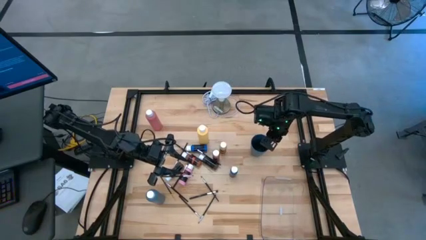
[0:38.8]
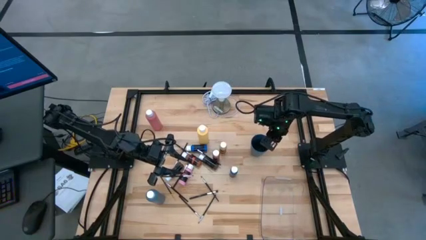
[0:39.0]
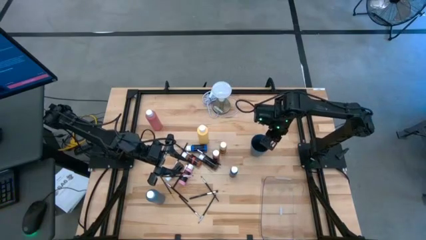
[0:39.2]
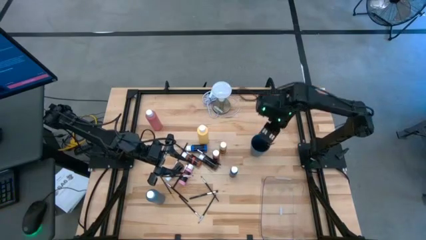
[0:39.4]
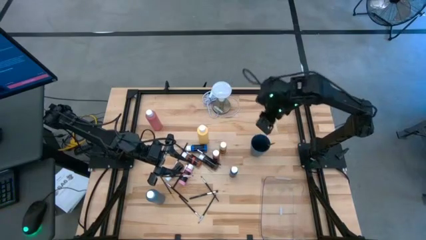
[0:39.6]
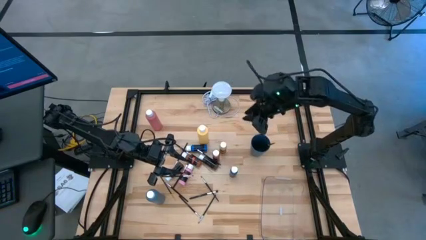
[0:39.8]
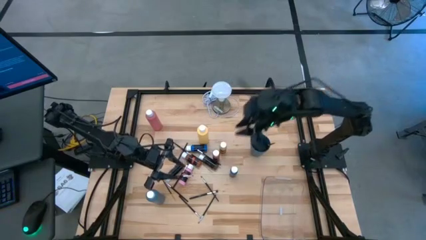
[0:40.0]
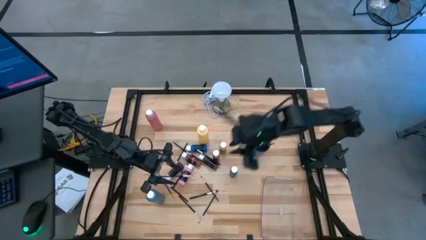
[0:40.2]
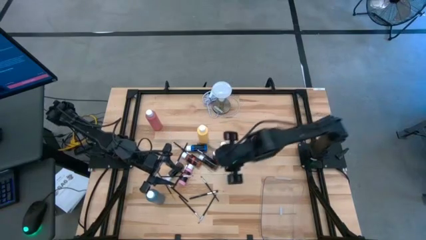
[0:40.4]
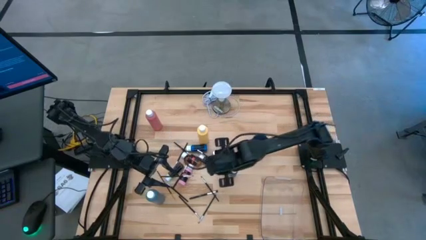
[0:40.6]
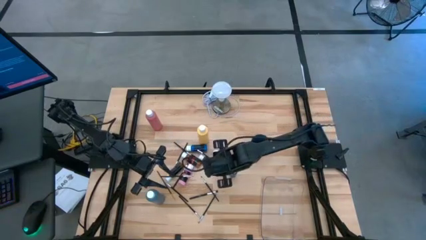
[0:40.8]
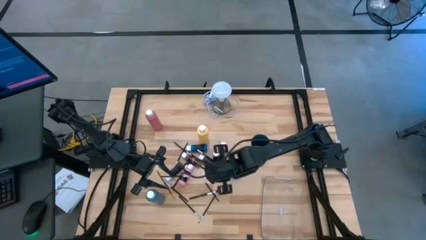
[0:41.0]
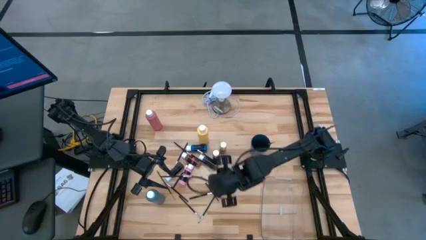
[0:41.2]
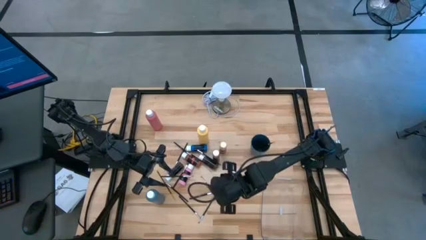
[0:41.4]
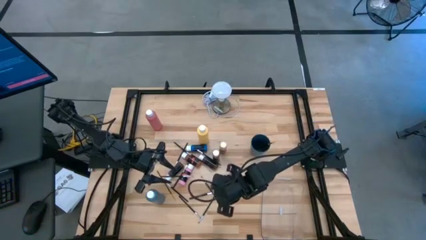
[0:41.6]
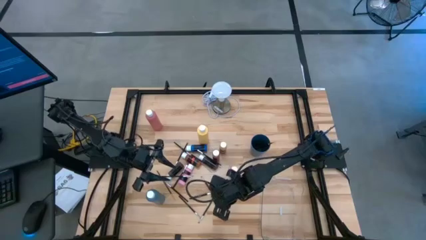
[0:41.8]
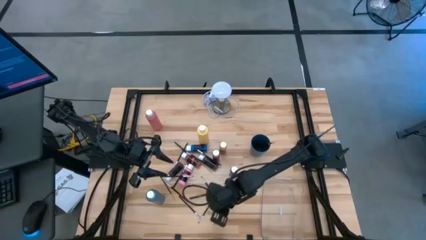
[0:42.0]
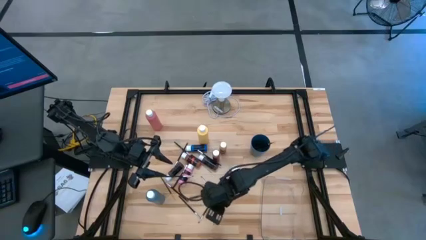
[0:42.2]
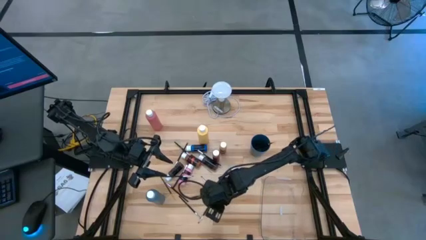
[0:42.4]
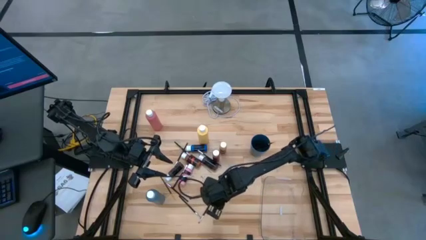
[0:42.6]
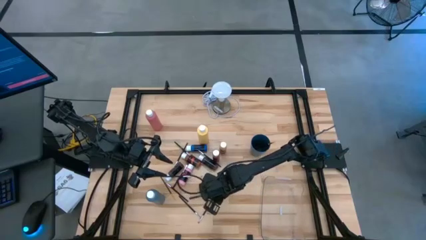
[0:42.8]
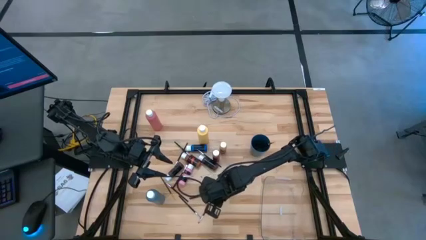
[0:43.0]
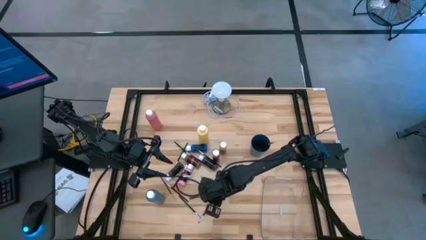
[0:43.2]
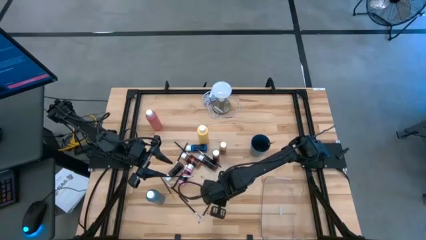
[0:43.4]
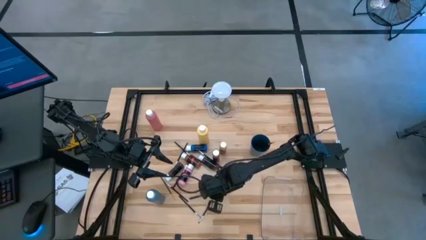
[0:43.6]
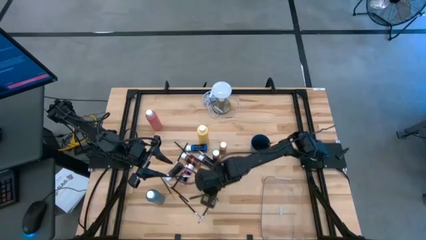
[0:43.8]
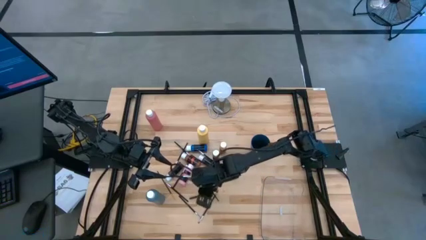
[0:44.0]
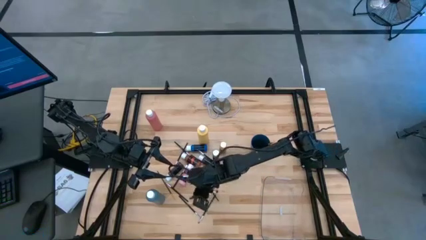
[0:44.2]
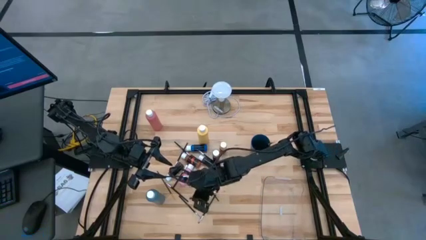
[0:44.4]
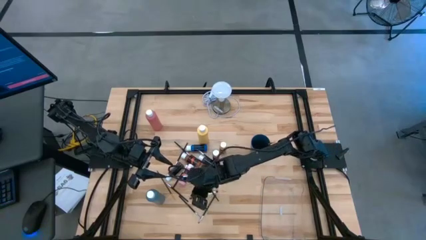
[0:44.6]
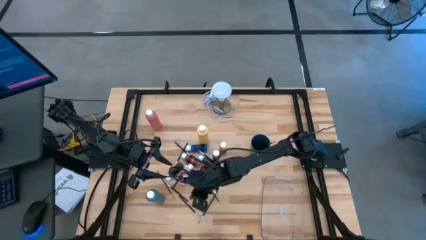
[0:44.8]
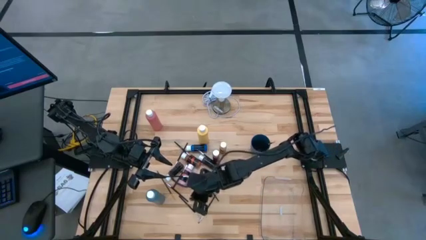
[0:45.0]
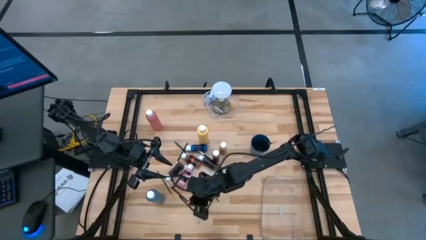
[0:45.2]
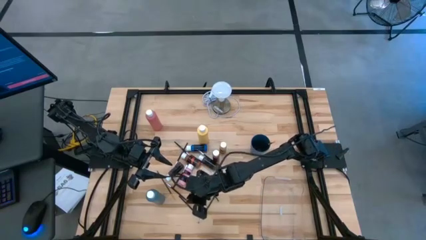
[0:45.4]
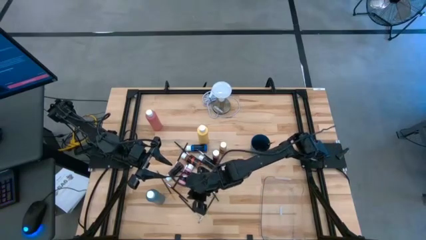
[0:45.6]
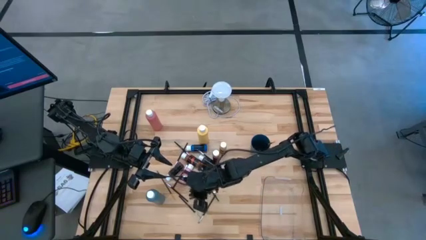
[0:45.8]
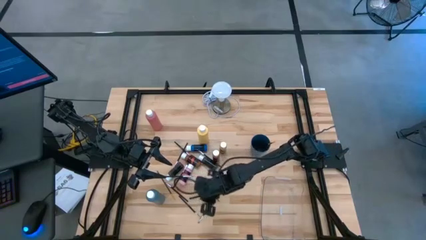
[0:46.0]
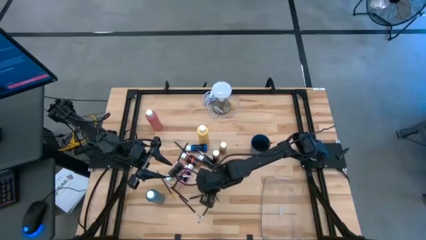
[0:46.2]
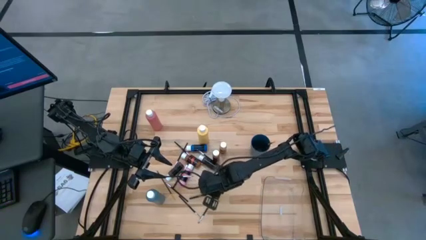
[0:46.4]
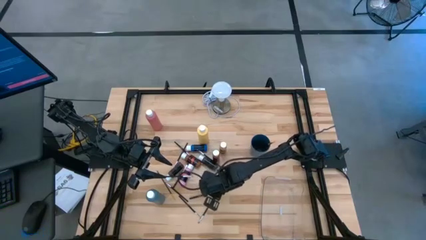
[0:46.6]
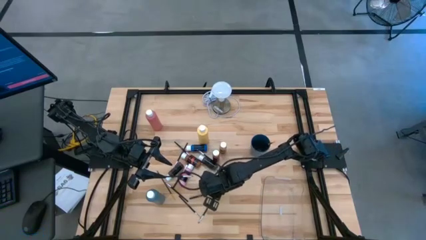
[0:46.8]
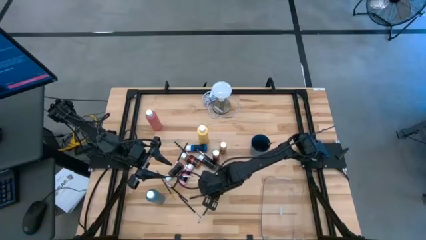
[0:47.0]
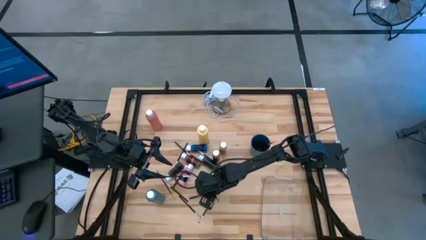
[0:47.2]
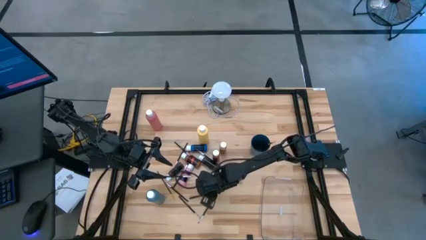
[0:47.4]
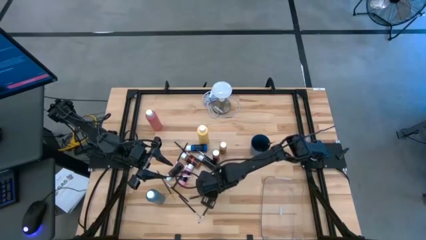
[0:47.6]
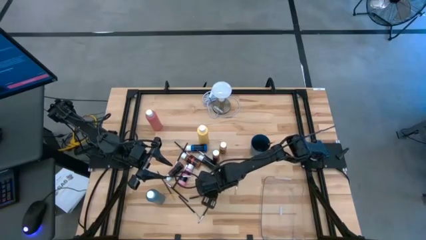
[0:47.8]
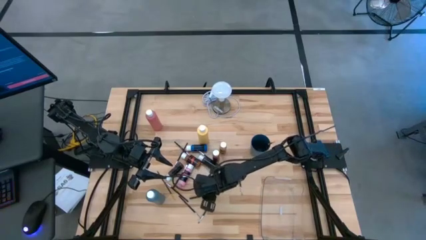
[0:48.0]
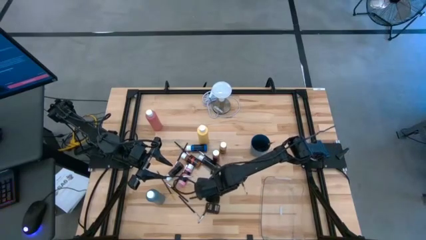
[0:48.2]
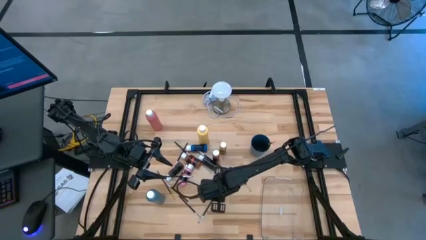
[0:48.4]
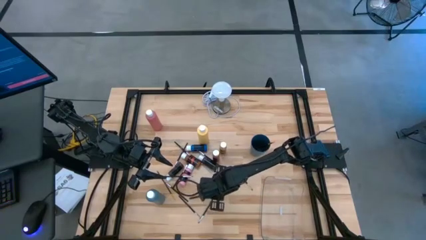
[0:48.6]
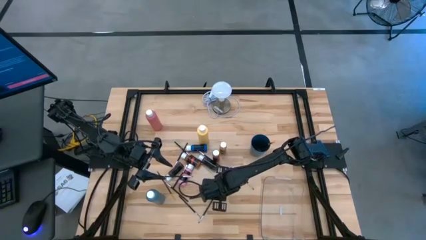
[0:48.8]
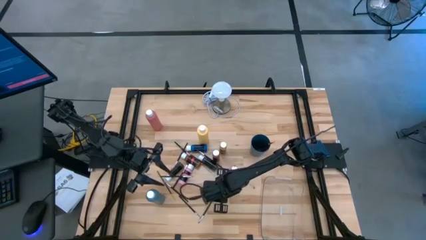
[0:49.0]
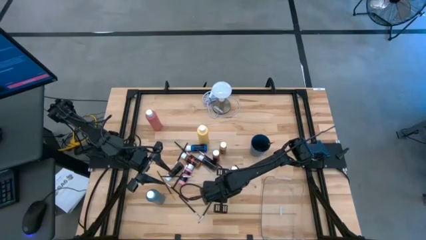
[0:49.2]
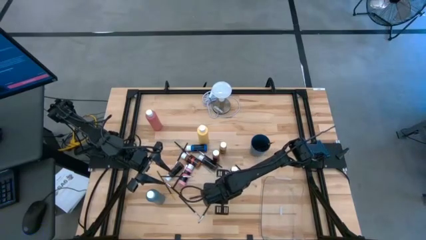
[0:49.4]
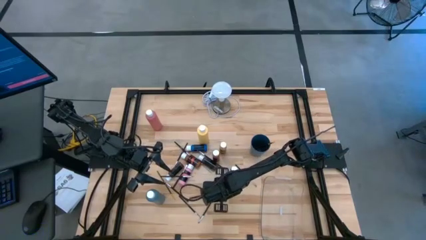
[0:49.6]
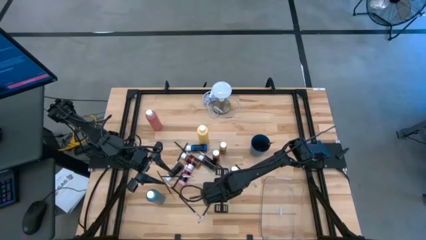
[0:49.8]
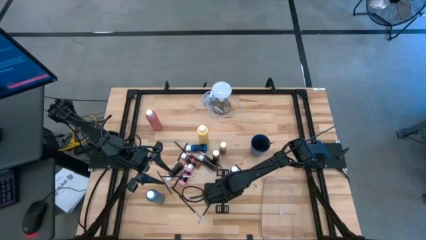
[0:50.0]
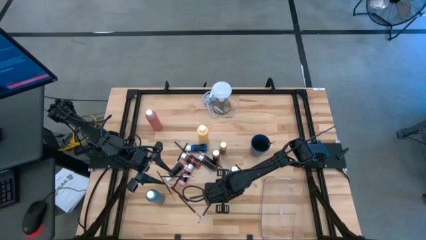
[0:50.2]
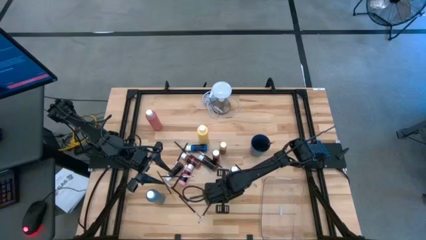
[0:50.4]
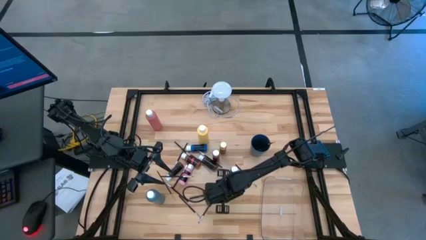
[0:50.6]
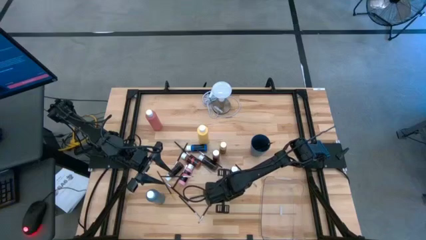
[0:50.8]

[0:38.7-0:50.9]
Task: Pick & Place Paint Supplies
Put the black silver paintbrush into the blue cup
